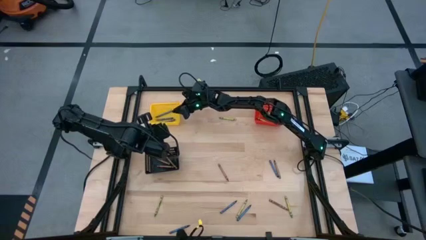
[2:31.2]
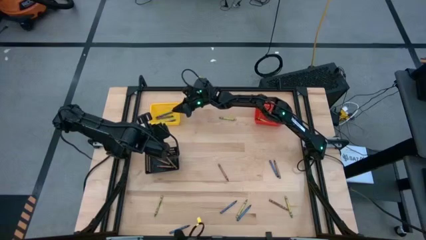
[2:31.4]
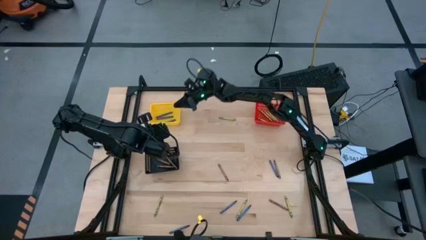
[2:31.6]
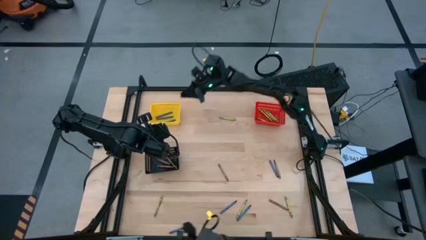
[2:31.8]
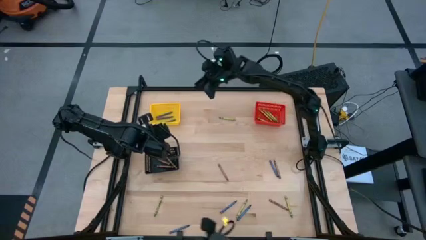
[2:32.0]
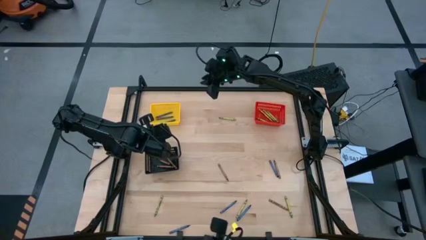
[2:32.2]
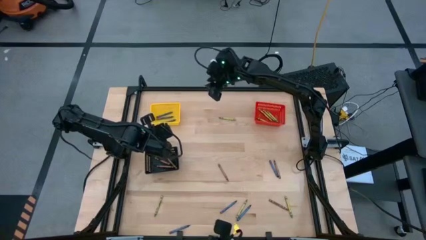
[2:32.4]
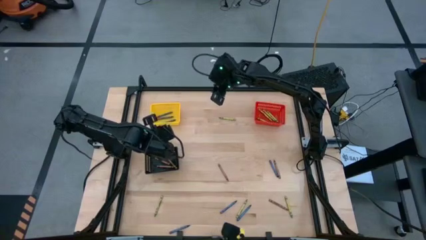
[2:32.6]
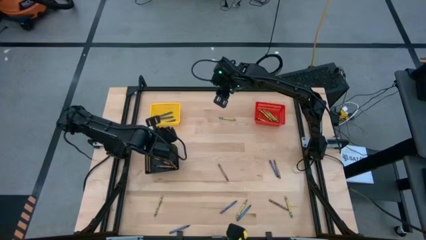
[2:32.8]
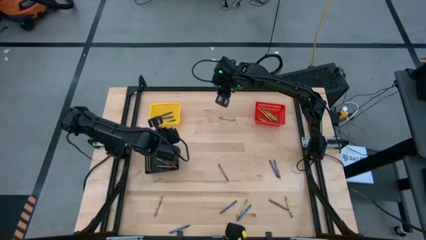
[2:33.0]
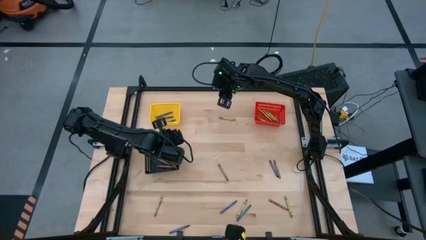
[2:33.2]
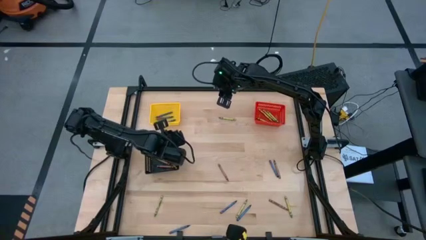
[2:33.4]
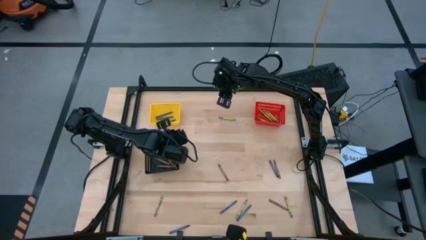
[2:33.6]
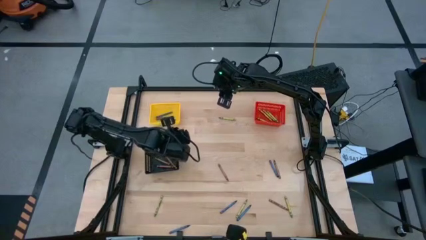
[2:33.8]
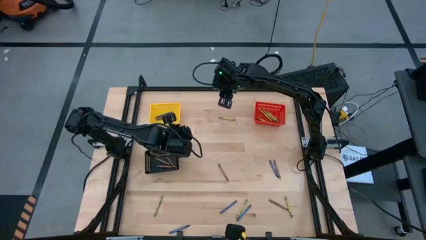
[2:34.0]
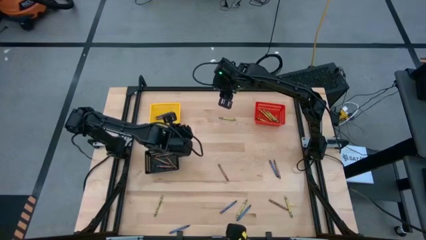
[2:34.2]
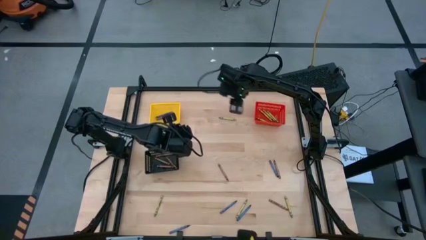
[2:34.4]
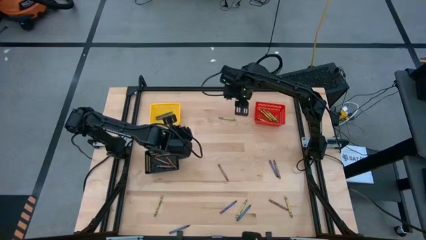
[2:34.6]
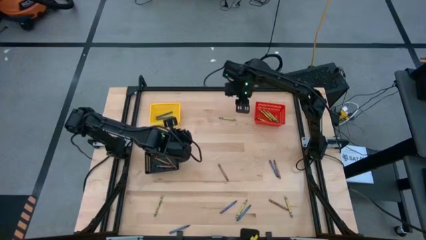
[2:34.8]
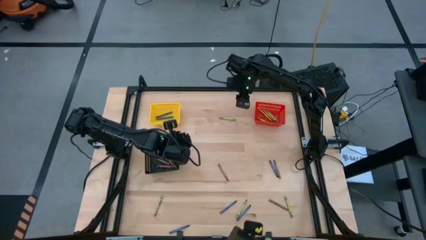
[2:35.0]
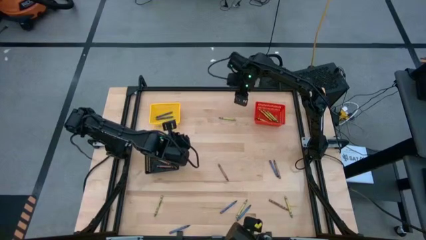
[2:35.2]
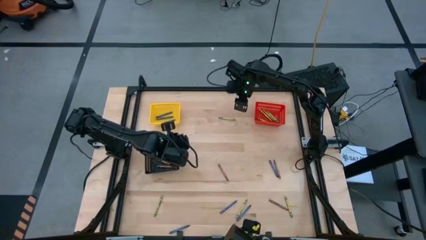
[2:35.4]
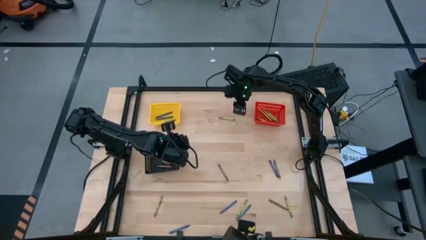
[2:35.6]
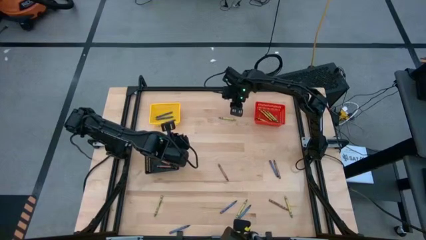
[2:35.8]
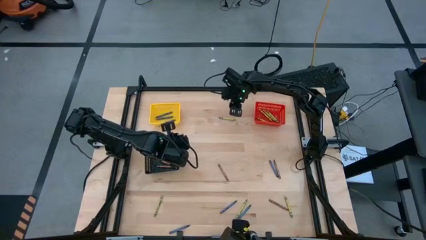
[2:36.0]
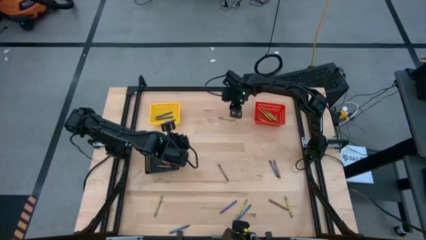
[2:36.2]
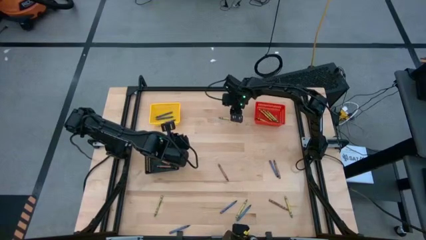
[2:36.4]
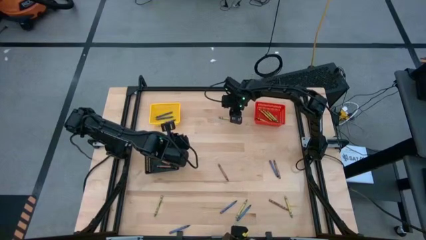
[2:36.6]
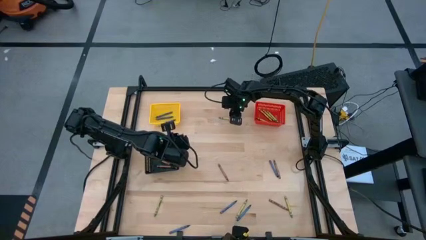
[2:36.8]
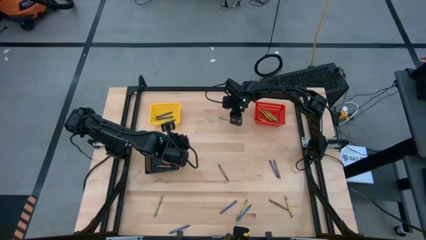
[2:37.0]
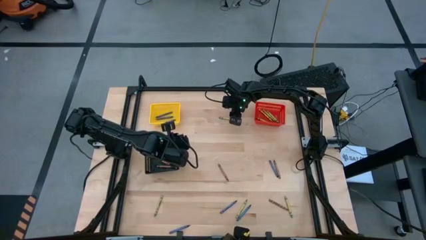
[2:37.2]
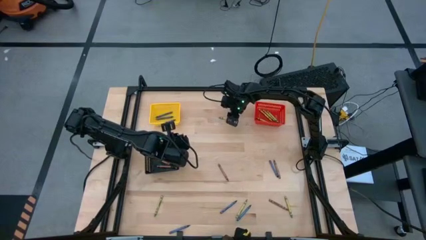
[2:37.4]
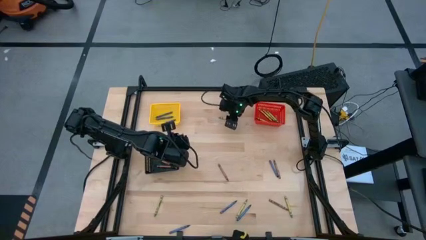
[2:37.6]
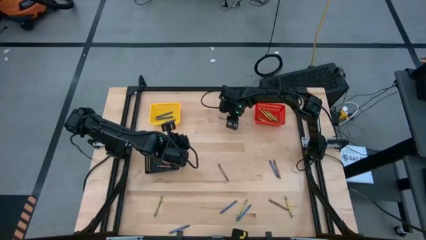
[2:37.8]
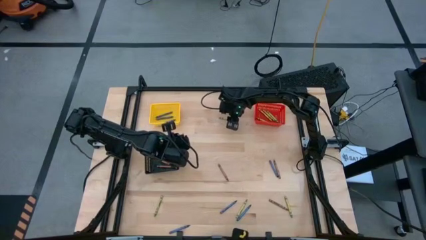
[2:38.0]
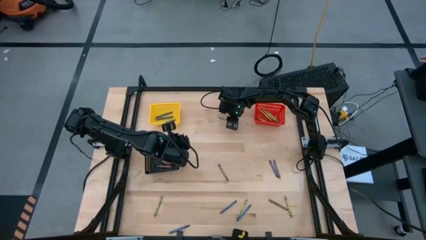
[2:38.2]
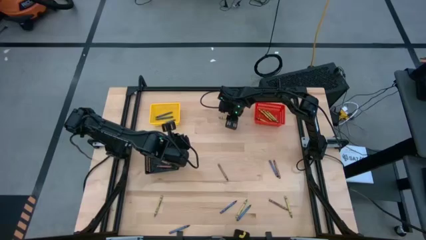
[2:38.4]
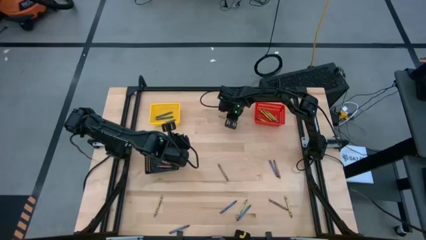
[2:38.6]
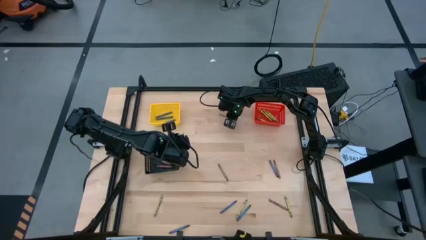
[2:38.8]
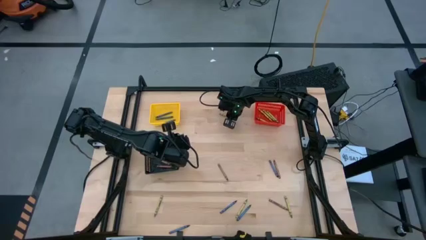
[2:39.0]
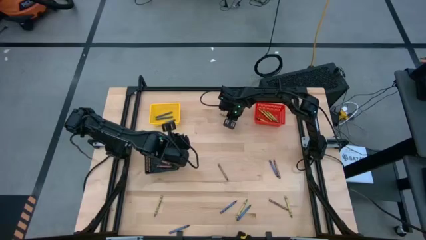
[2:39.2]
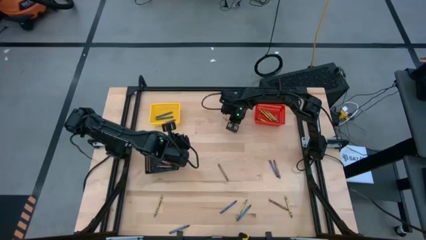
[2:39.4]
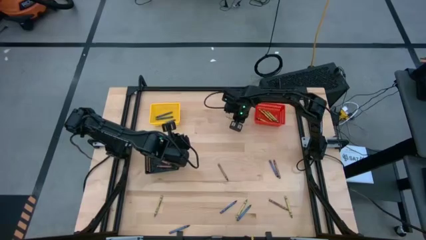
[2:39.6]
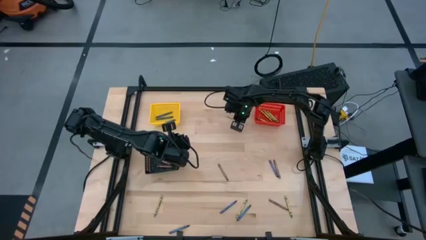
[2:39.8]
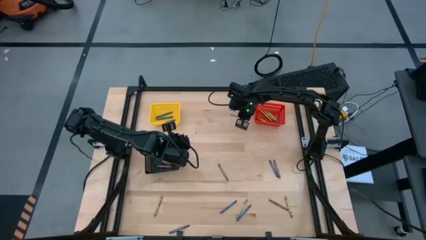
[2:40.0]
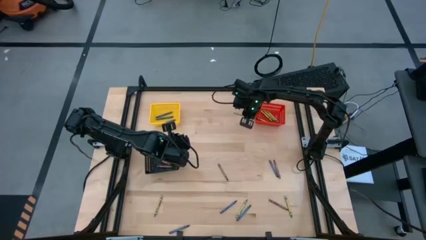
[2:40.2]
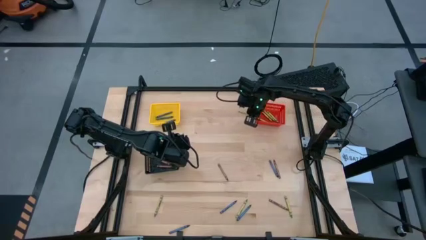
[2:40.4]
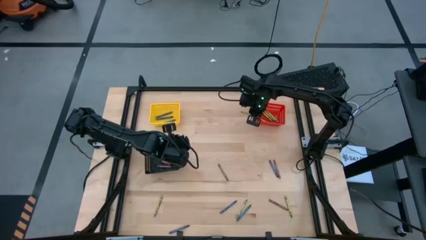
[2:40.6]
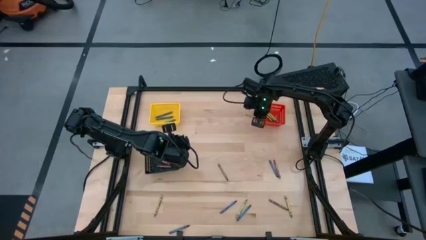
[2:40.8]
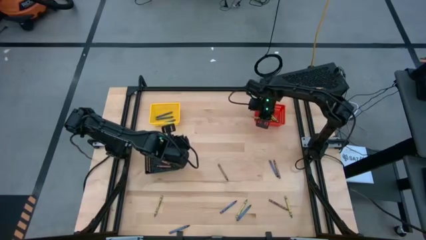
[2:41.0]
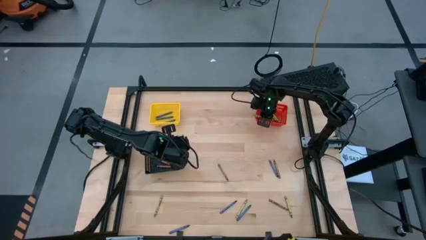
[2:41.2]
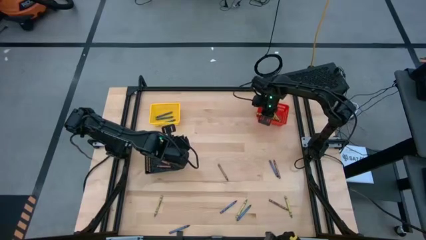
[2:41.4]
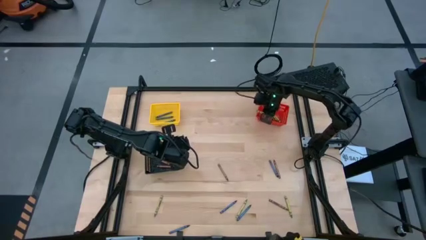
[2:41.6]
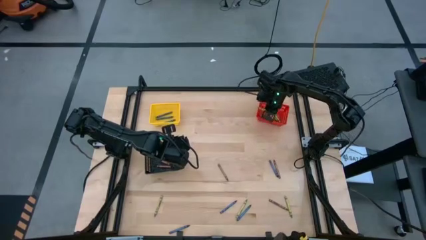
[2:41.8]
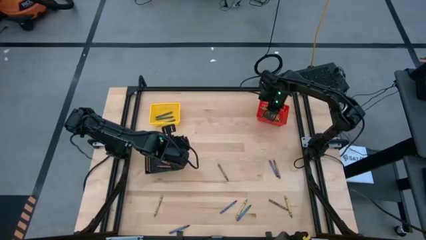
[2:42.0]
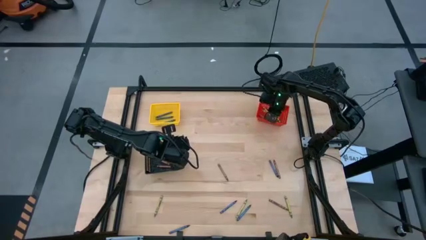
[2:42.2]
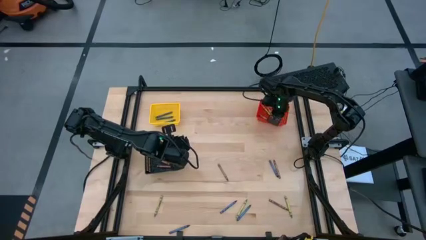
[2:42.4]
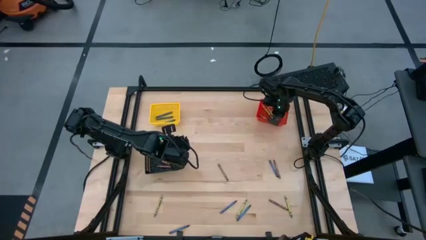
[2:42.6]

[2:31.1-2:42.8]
Task: Sort crayons
Put the green crayon into the red bin
